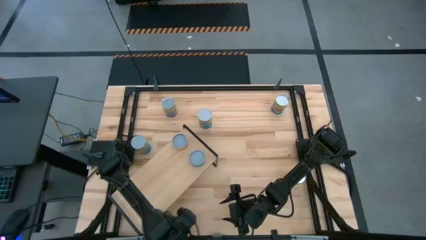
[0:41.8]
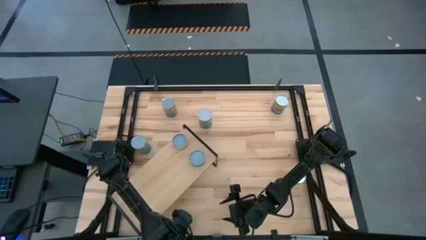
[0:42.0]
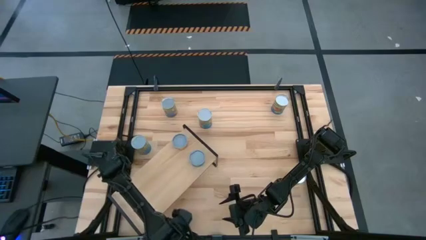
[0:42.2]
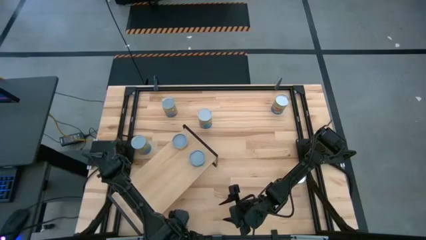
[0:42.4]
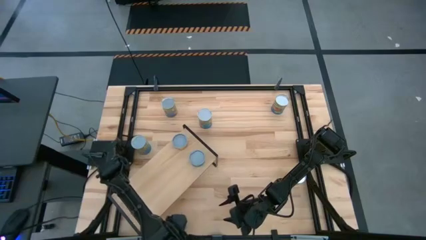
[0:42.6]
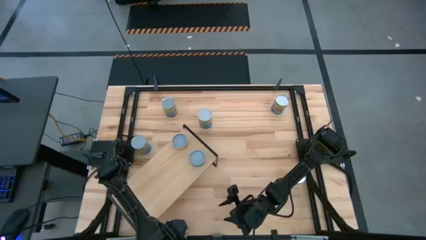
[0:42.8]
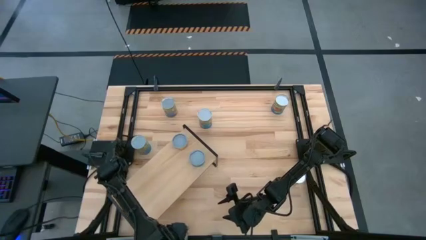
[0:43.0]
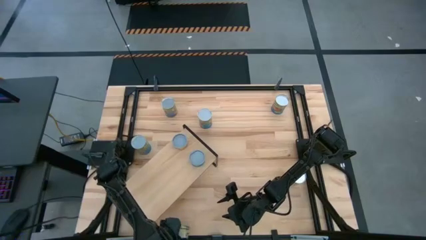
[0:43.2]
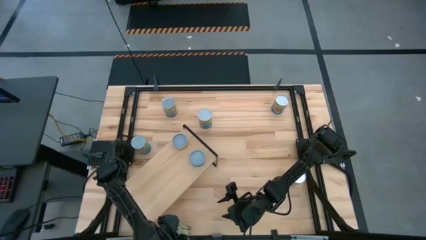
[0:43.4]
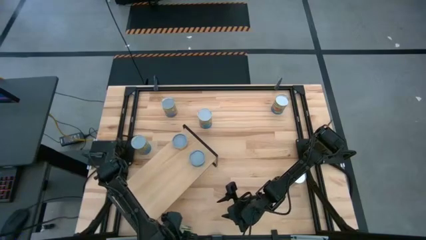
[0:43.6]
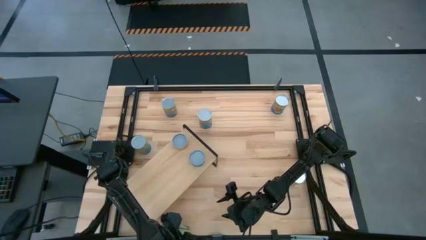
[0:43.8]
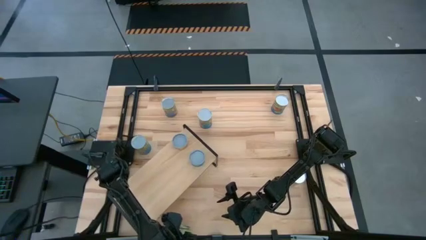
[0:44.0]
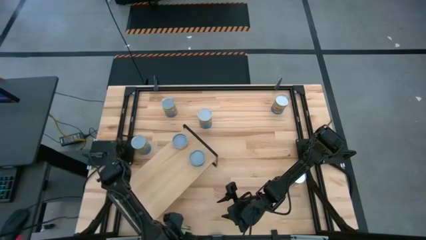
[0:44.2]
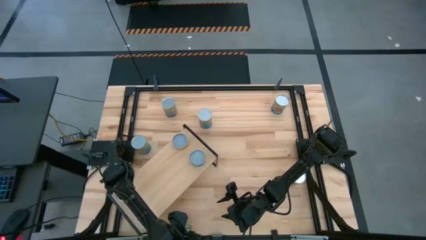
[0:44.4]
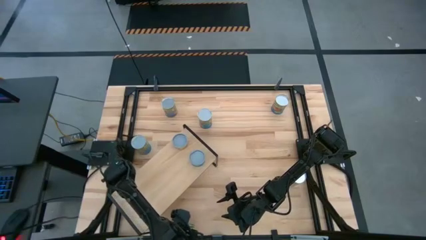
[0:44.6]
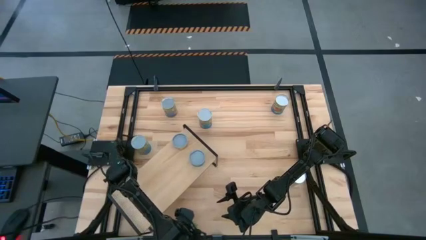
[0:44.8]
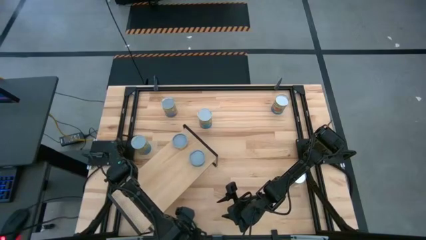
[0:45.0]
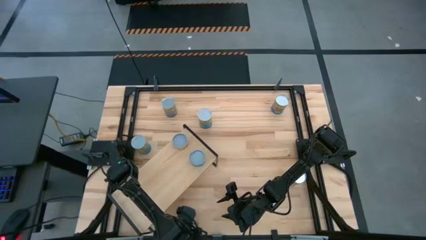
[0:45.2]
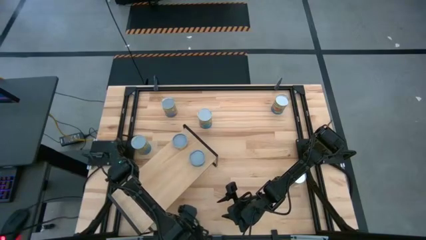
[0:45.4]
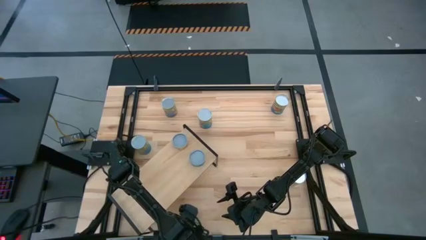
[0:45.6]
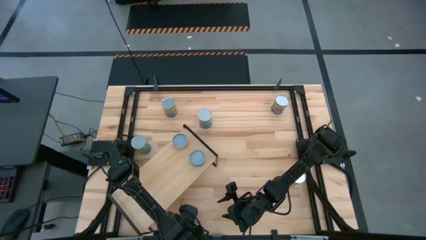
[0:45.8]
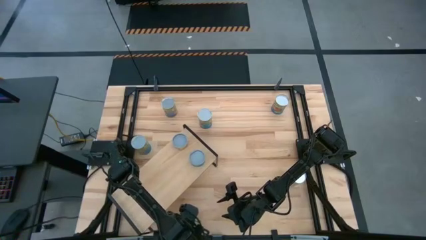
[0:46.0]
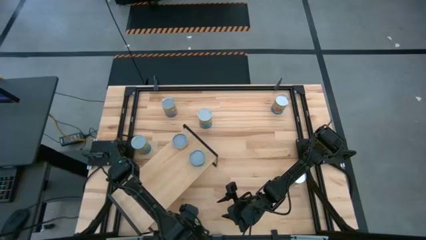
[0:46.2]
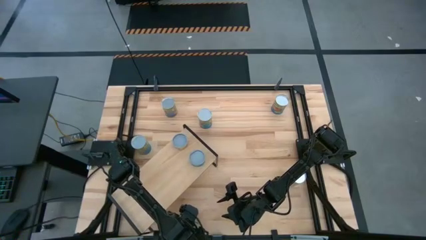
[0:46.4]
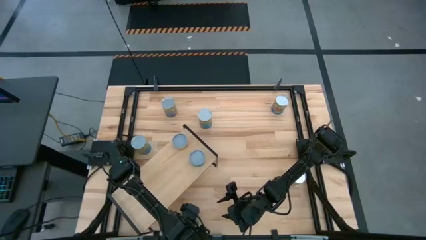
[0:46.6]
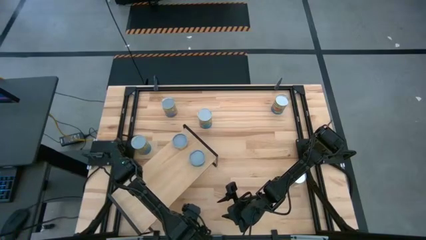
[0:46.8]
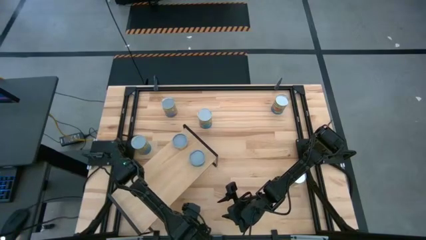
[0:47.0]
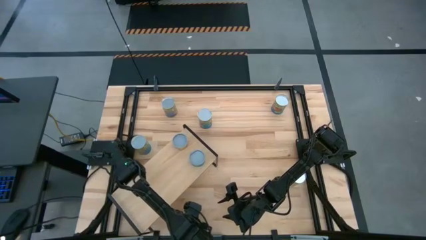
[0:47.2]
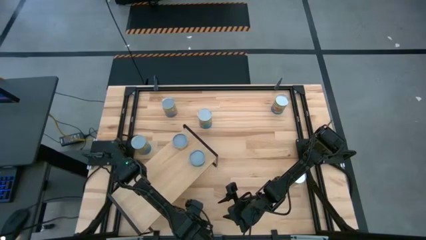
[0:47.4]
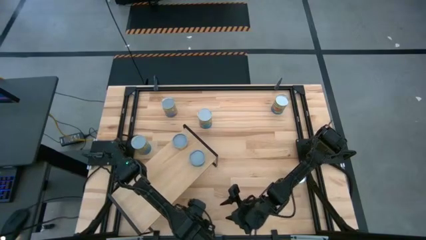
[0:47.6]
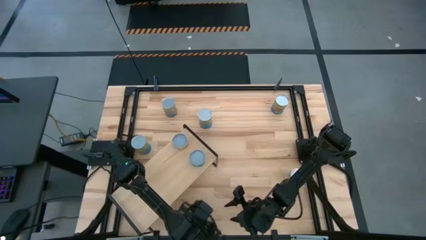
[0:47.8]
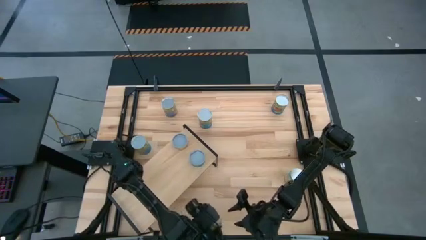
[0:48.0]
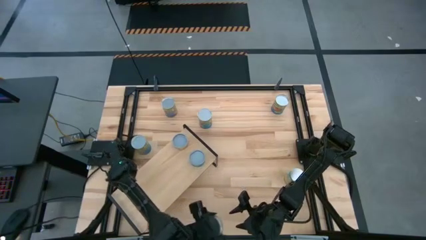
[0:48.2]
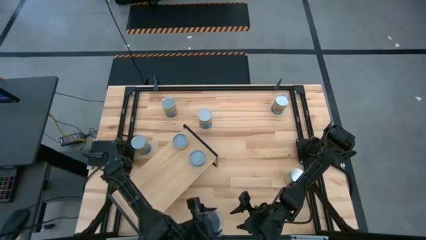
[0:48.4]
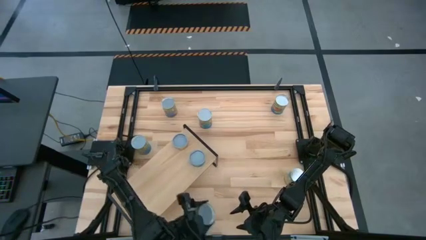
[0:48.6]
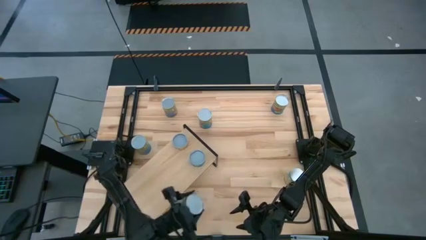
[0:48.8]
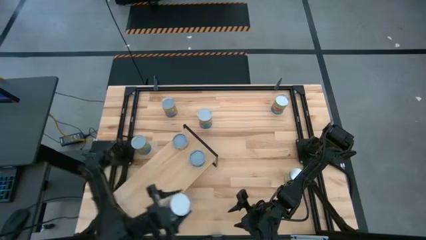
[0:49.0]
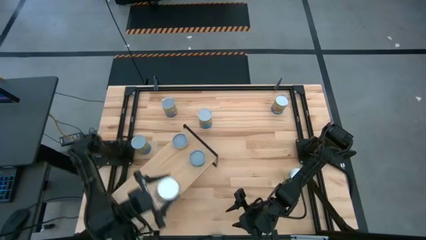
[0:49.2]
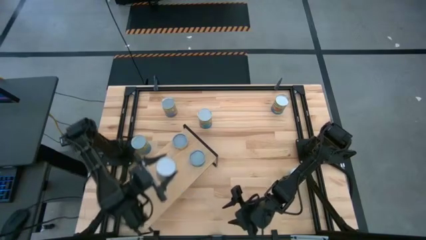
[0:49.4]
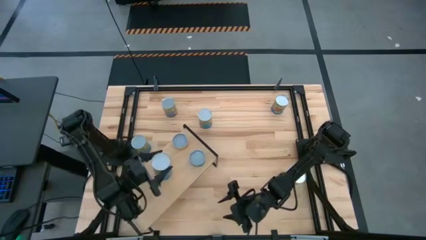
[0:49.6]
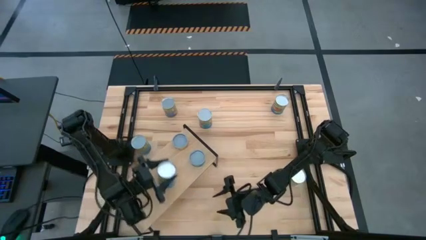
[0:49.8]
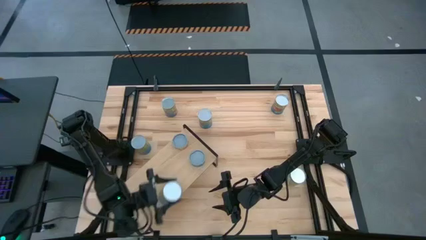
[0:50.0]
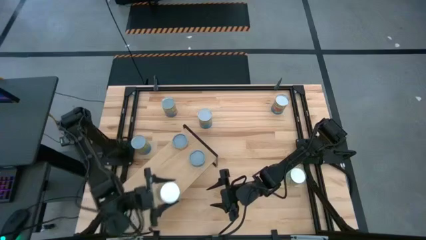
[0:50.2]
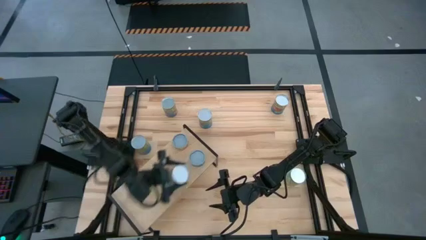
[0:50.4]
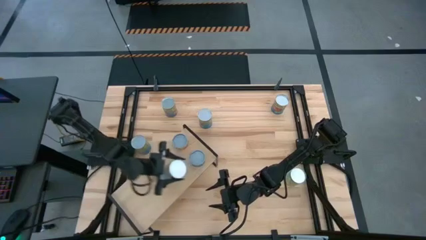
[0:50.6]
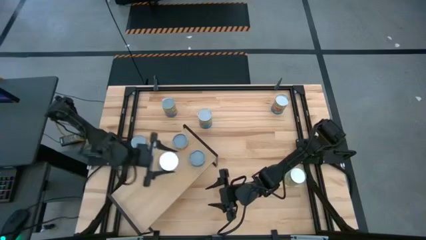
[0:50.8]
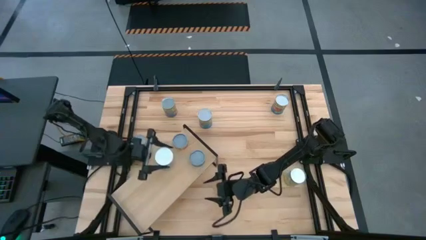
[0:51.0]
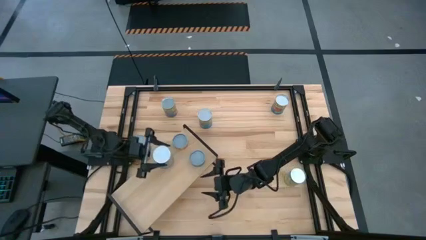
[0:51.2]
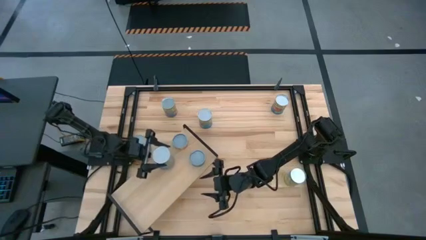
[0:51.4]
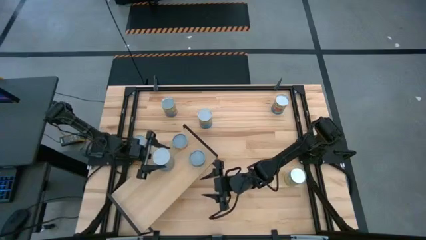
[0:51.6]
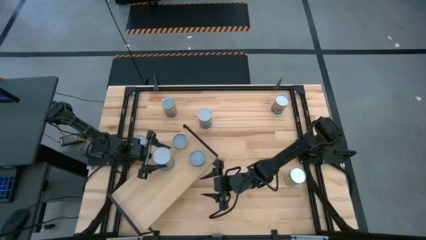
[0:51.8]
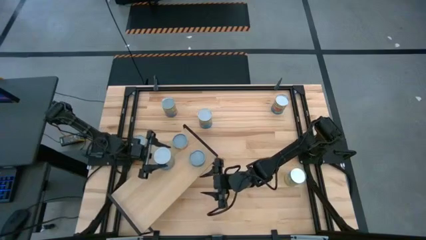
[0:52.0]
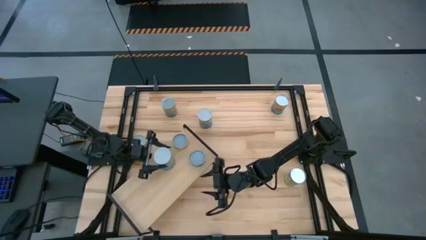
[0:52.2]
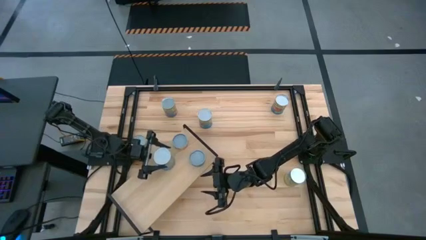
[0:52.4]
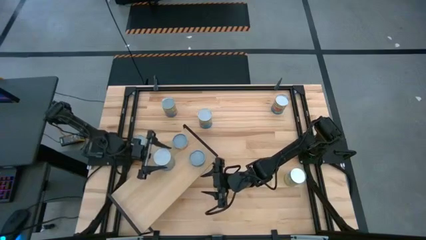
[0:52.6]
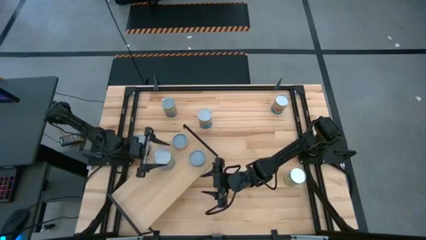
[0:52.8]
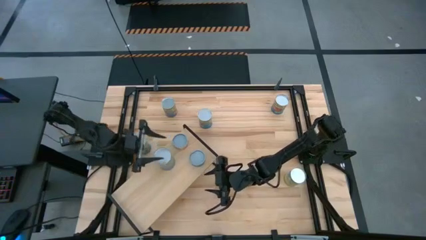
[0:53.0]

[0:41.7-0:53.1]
Task: Pick and place cans onto a shelf
Put the right canned cherries on the shelf

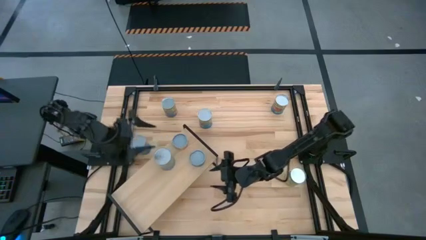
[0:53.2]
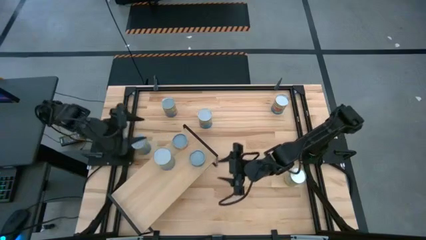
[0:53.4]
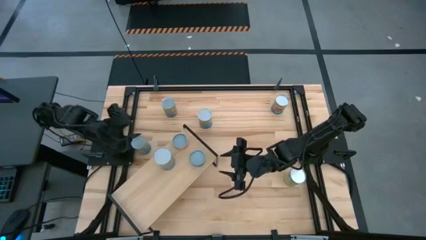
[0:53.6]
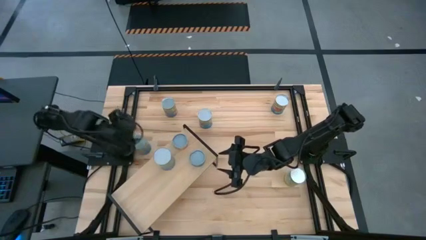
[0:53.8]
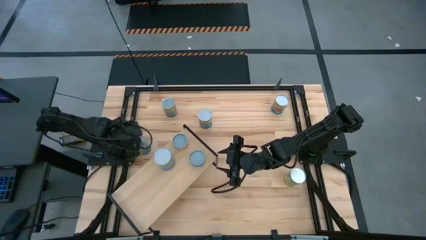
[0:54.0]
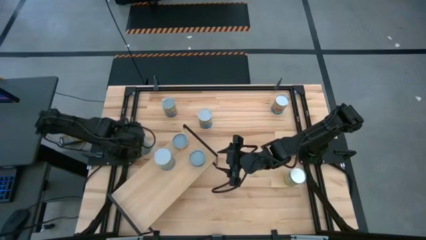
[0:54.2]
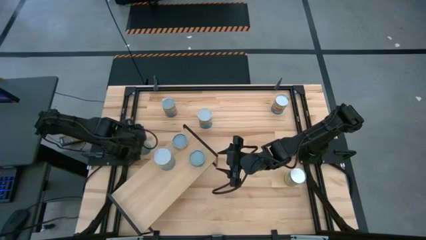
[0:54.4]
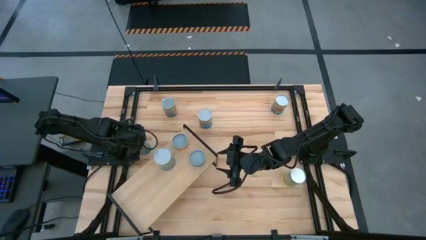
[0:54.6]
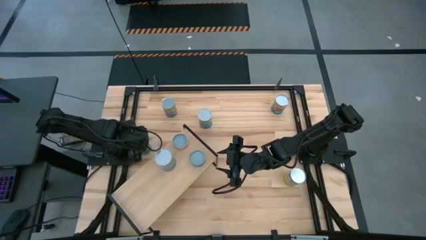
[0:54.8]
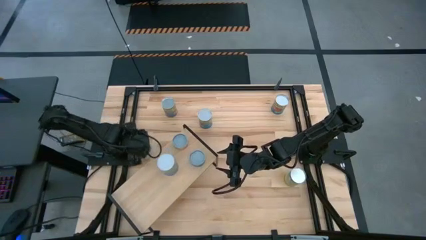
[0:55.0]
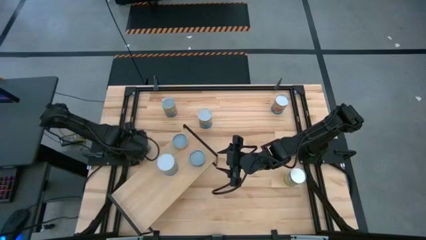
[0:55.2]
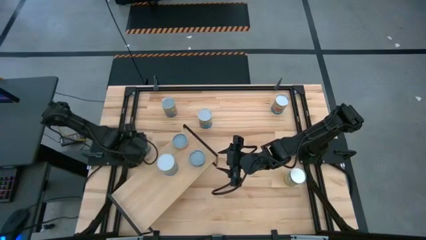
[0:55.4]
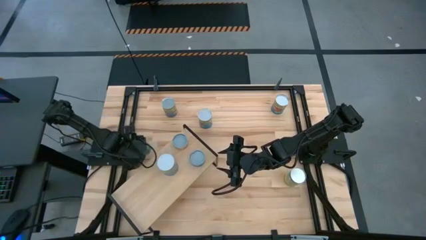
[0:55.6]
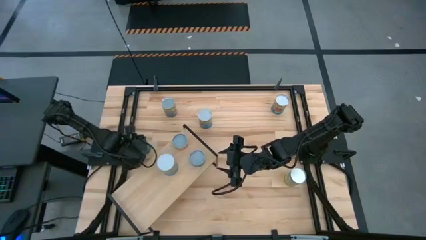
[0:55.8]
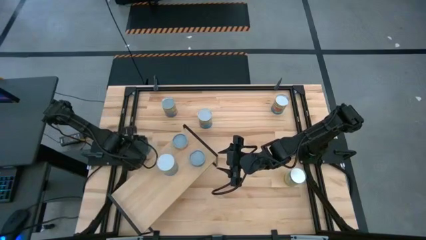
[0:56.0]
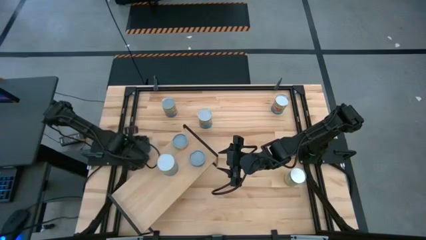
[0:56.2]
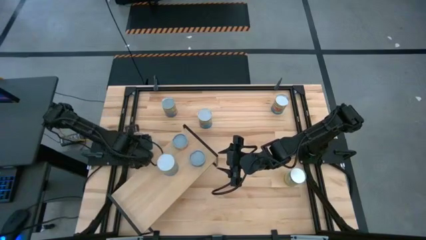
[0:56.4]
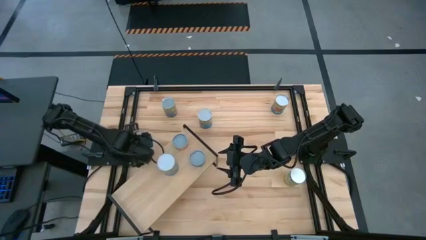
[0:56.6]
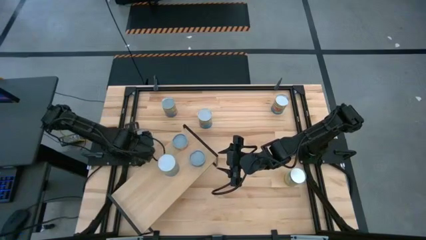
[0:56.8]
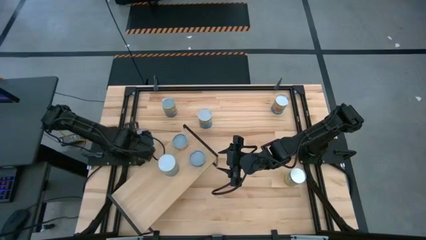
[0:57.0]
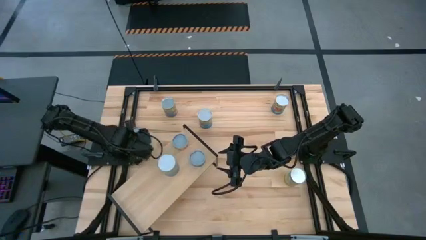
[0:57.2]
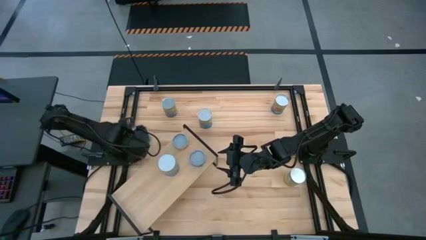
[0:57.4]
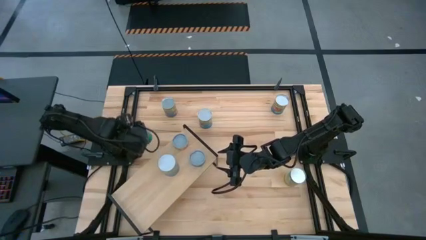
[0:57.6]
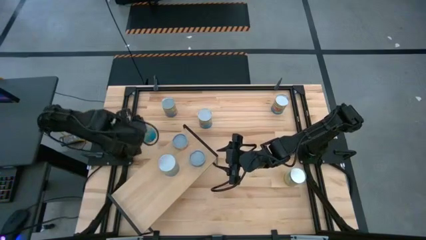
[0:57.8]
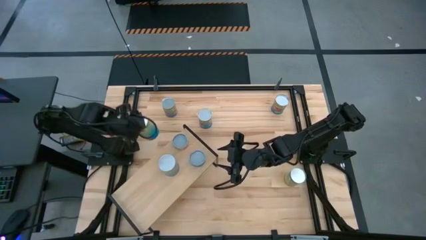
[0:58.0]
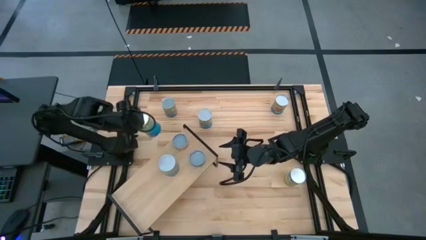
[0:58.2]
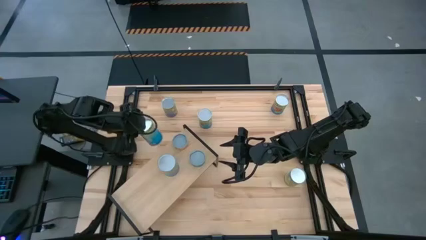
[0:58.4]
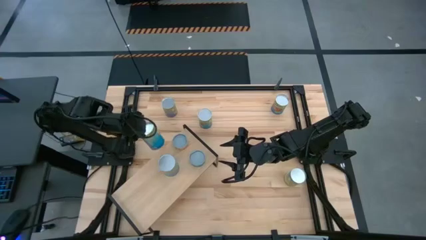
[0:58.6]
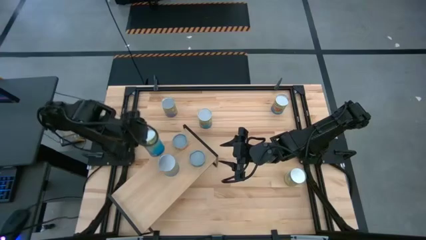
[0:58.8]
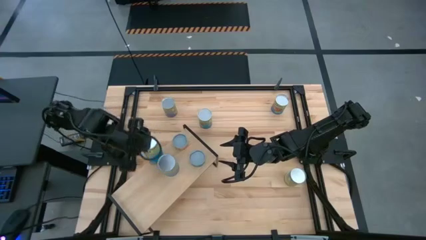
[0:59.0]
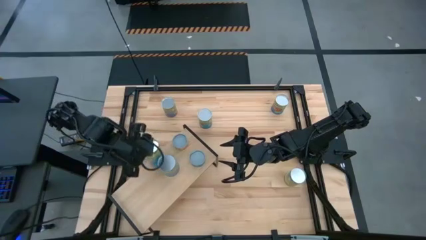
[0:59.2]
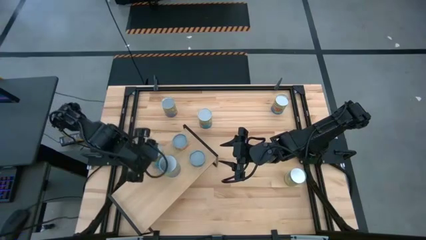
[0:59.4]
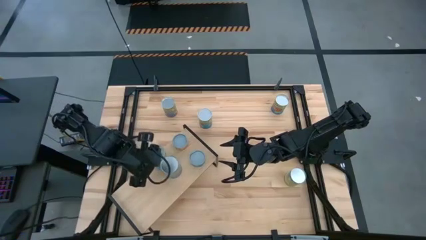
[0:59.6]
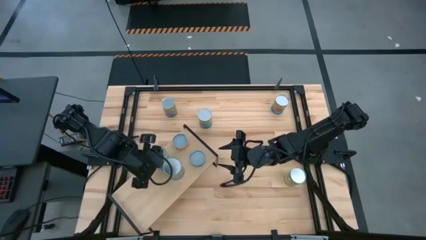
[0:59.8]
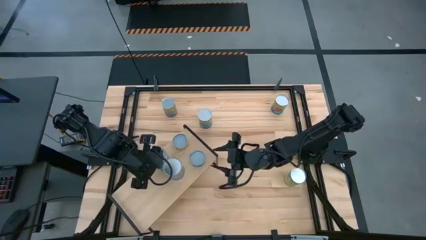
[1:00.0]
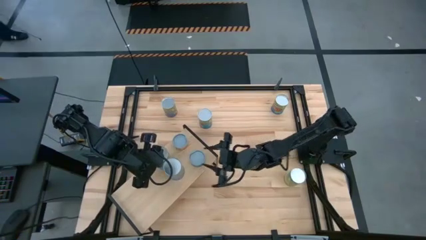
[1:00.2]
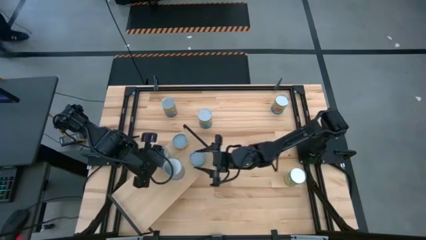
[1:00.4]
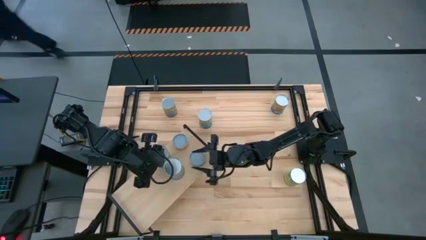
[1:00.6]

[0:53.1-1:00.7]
Put the canned cherries on the shelf
